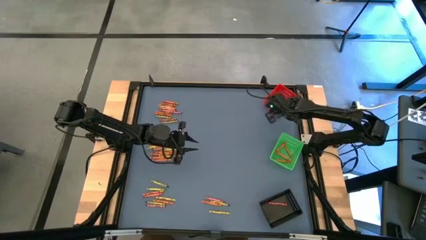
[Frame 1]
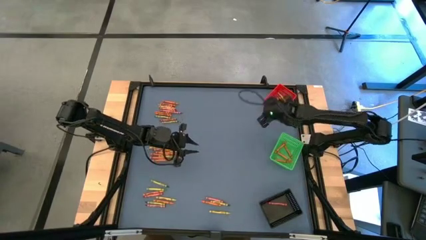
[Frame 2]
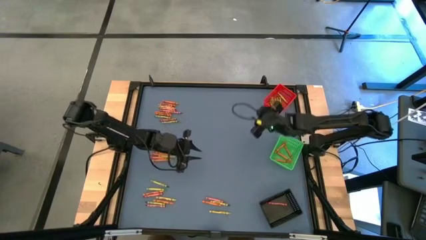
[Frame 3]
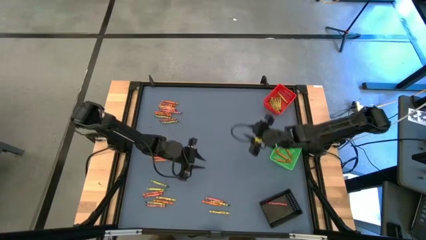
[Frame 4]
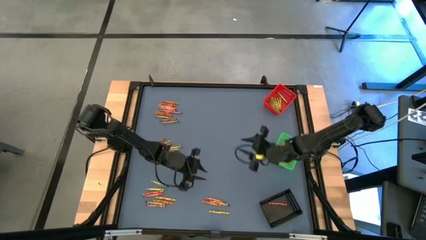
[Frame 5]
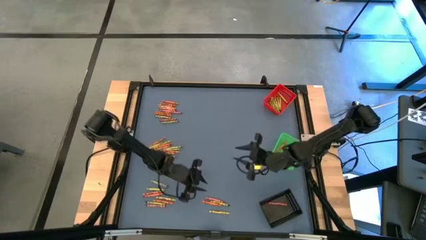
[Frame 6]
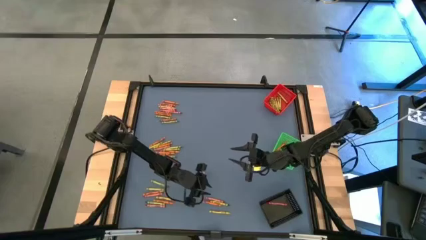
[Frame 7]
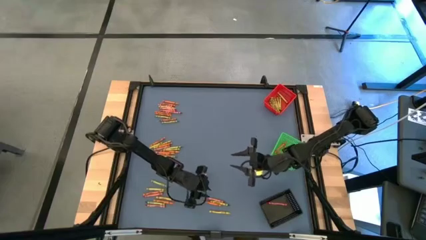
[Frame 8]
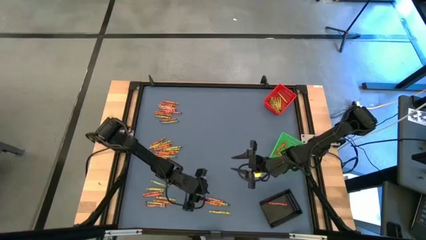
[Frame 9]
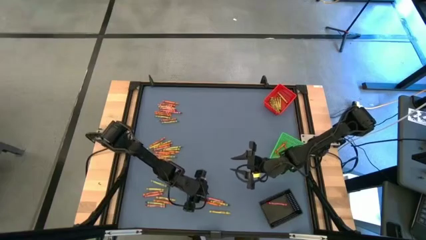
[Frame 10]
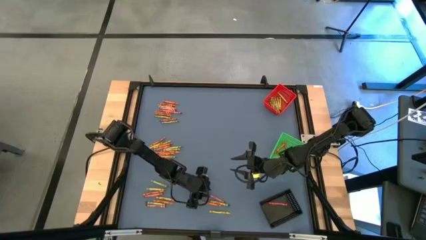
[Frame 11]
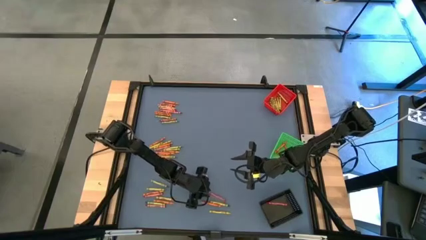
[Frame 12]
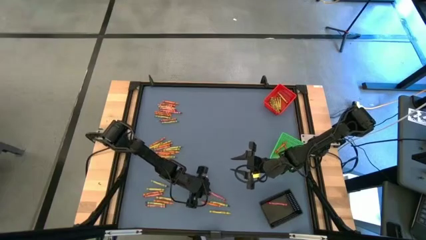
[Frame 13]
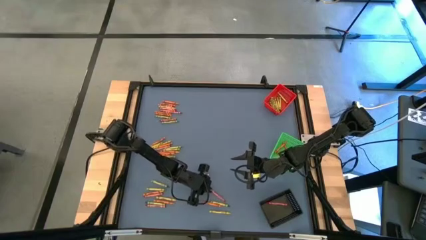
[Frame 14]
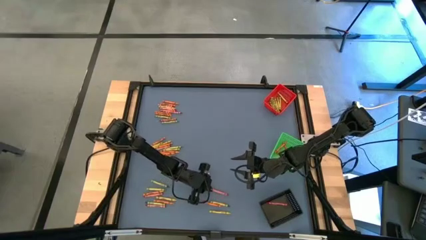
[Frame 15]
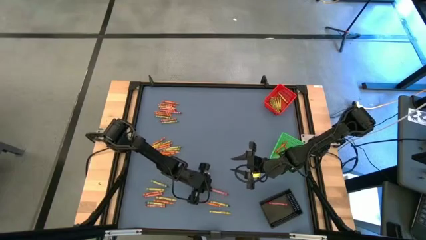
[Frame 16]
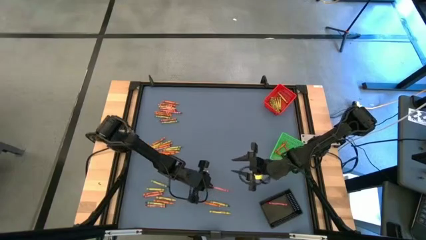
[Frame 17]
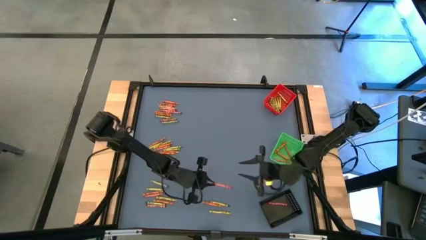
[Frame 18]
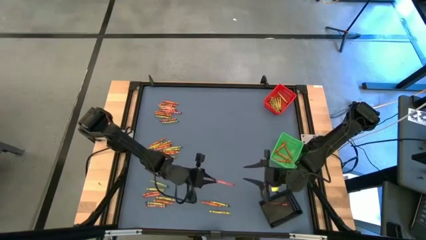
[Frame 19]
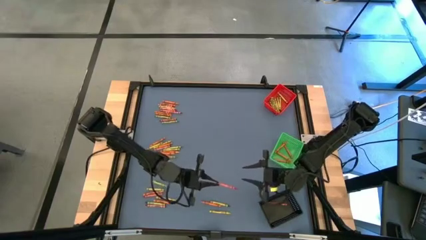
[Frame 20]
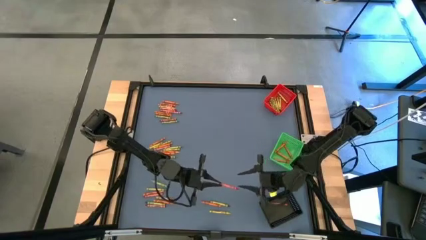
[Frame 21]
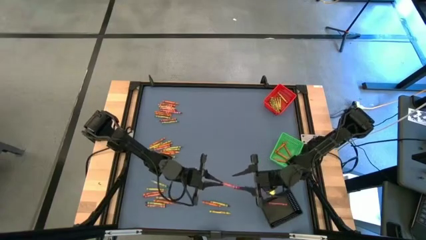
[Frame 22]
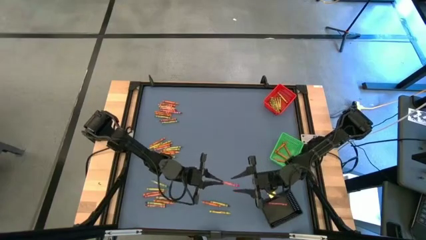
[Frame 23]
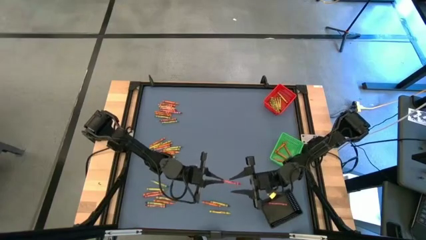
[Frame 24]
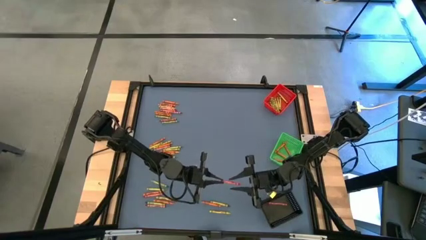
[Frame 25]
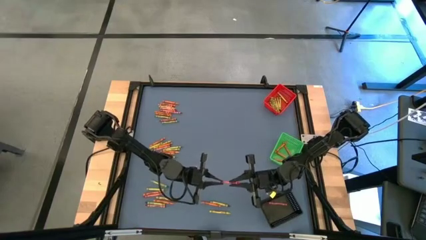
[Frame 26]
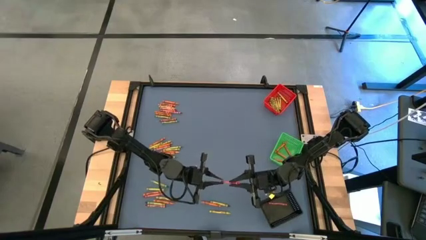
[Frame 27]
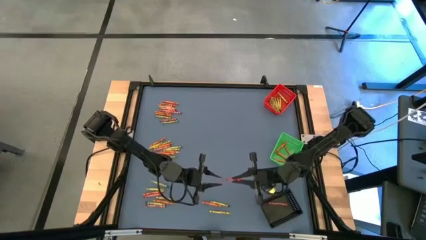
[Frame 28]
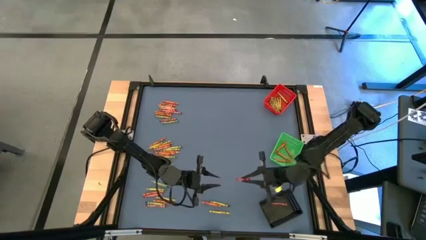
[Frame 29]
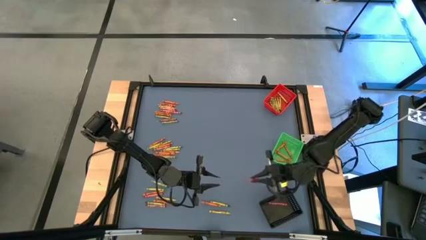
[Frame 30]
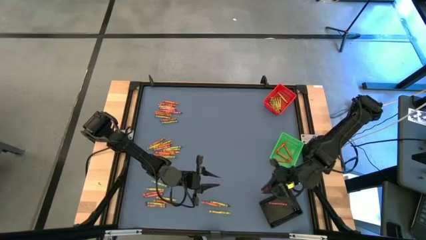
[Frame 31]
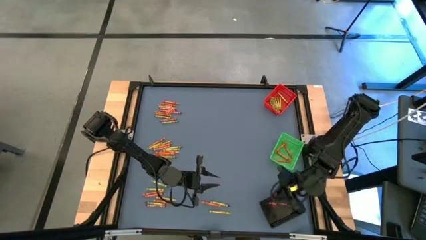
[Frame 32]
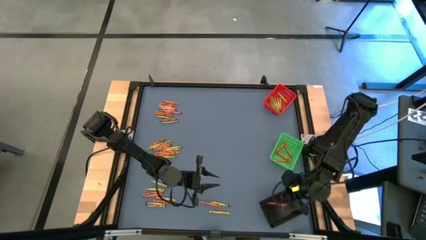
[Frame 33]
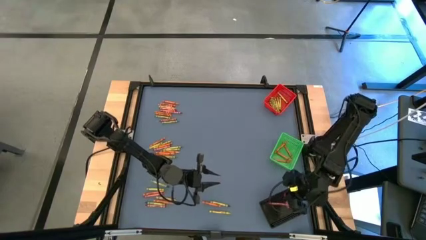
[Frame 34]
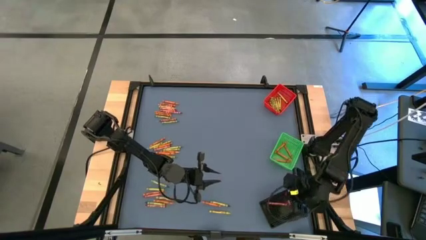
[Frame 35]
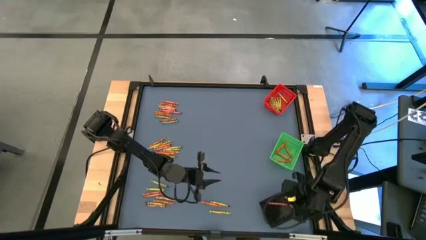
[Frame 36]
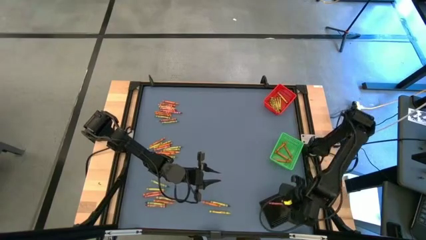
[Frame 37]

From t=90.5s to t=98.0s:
Task: Sort crayons
Put the red crayon into the black bin

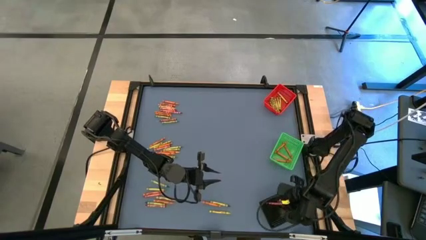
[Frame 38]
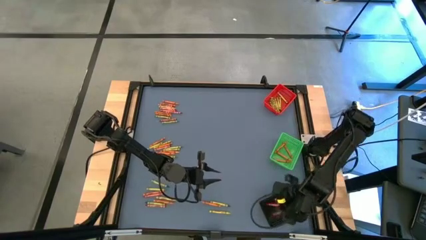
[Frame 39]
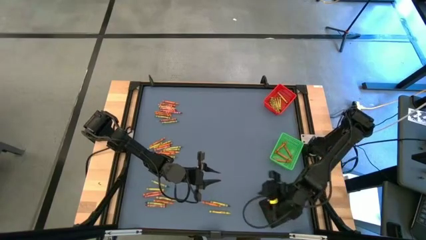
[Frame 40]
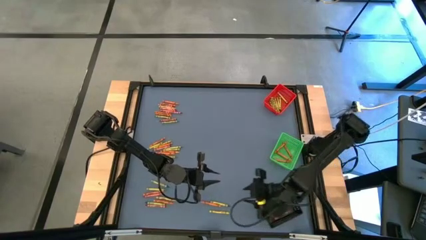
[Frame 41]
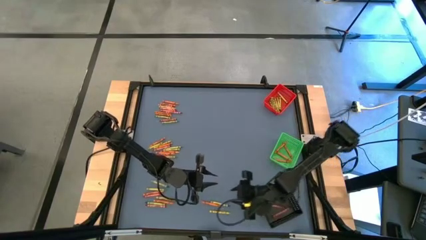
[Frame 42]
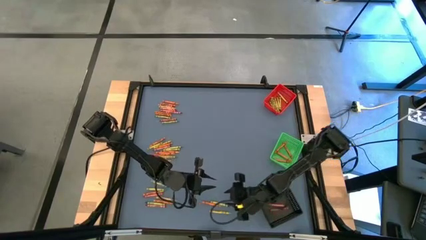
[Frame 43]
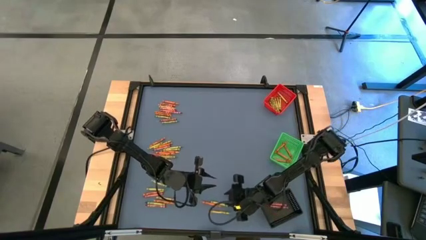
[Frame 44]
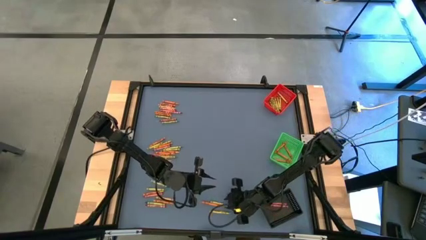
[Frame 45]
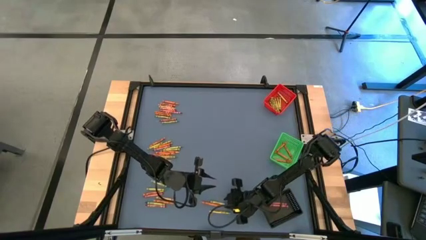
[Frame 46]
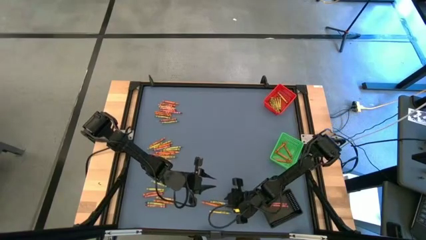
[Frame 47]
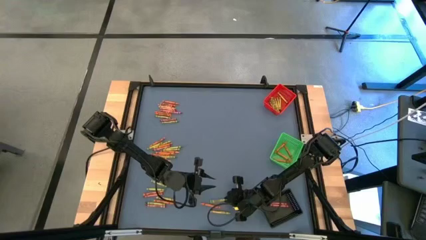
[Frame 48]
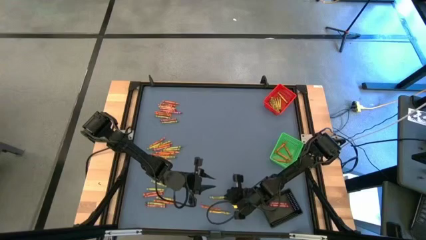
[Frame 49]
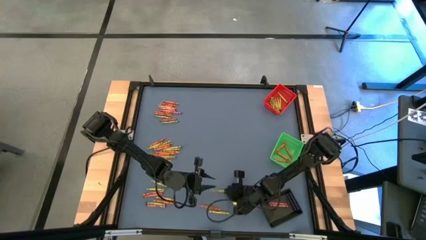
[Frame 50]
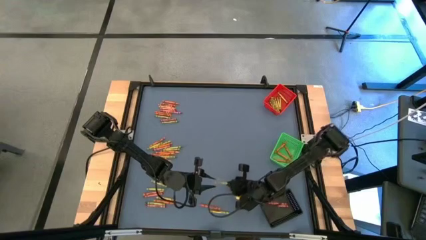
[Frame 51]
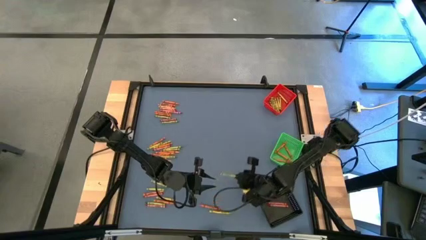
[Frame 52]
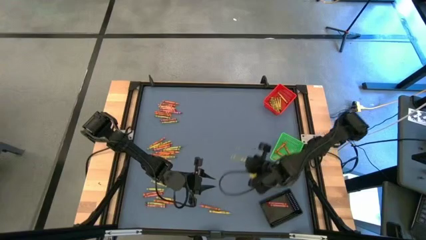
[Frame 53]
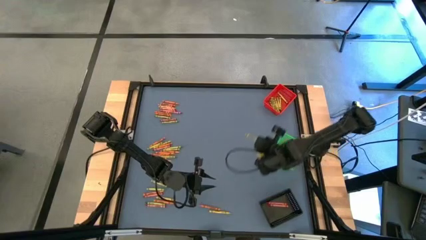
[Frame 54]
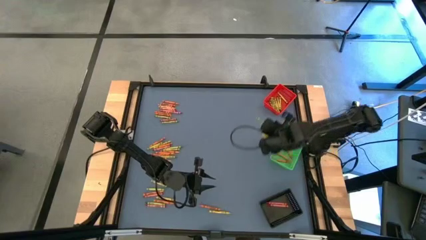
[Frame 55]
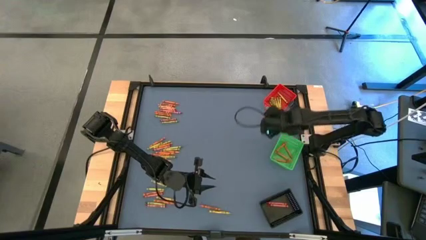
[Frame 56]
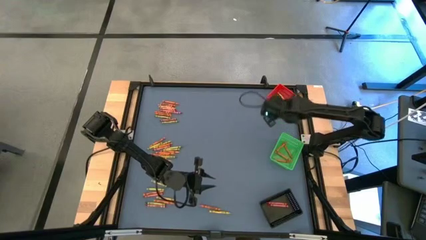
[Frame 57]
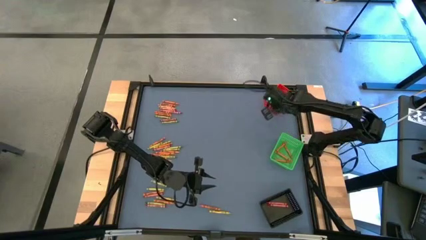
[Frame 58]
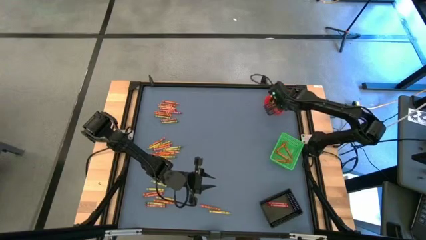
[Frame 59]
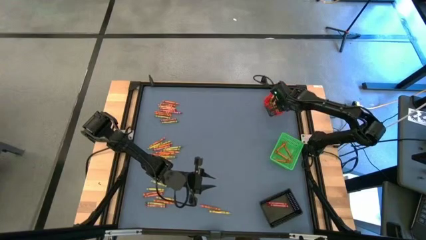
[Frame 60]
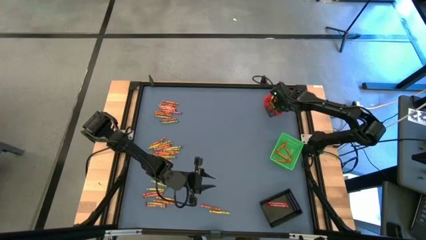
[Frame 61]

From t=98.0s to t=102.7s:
Put the green crayon into the red bin

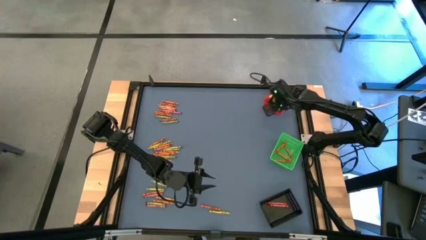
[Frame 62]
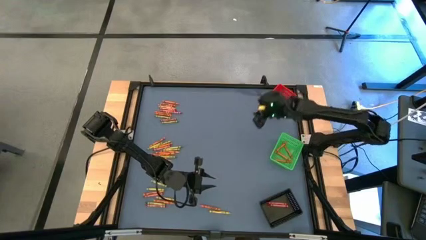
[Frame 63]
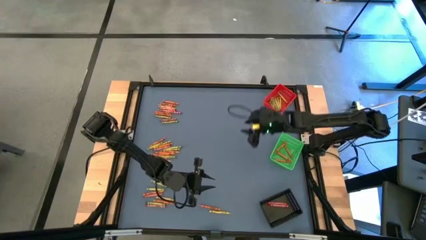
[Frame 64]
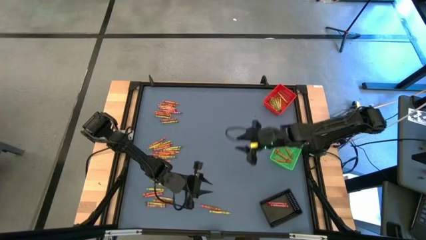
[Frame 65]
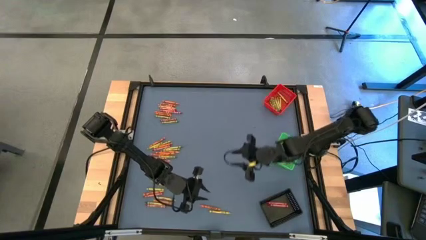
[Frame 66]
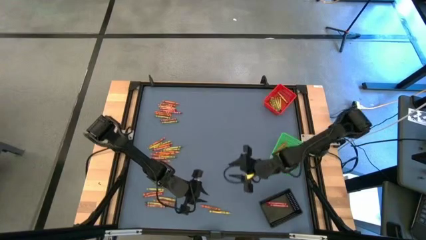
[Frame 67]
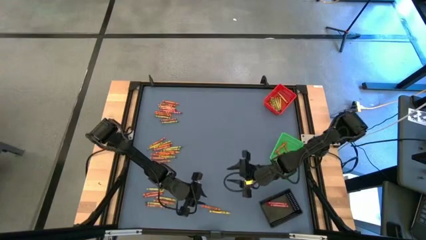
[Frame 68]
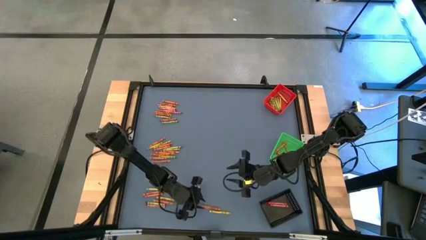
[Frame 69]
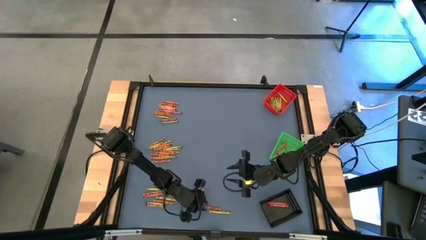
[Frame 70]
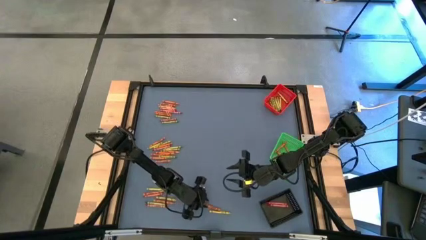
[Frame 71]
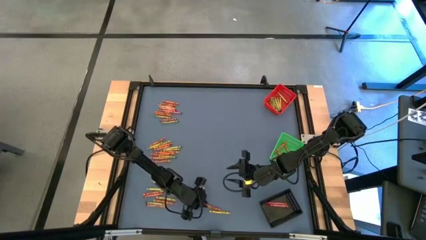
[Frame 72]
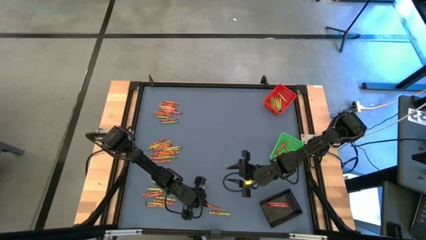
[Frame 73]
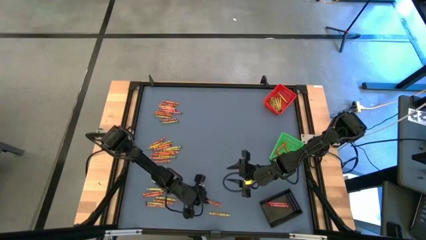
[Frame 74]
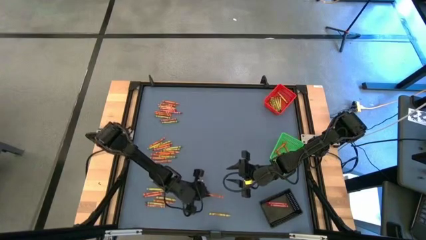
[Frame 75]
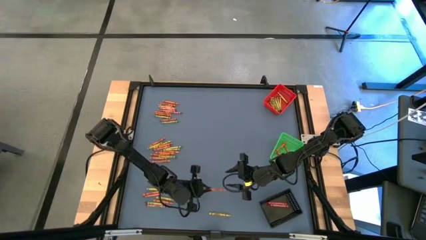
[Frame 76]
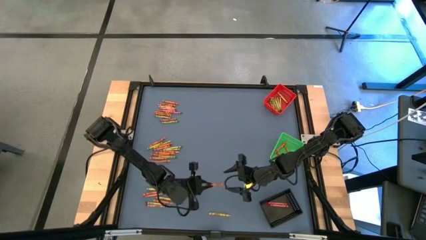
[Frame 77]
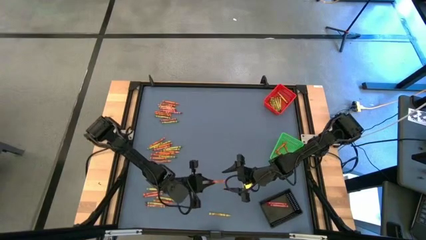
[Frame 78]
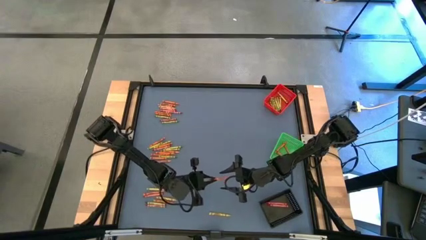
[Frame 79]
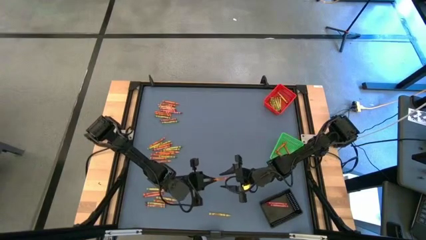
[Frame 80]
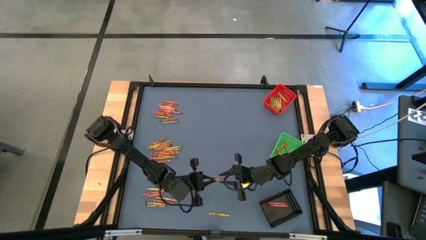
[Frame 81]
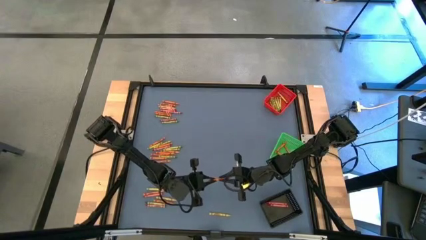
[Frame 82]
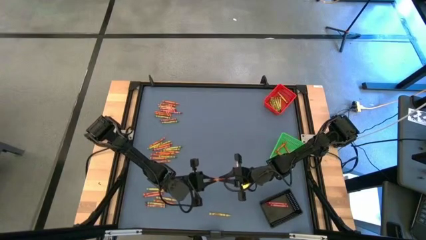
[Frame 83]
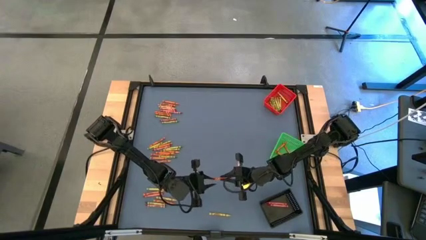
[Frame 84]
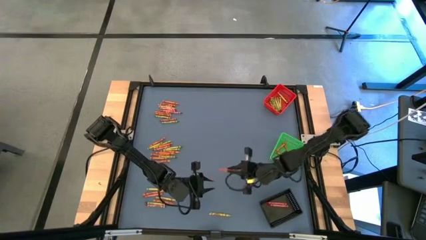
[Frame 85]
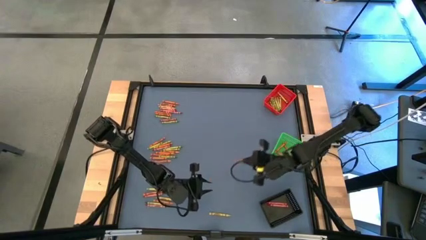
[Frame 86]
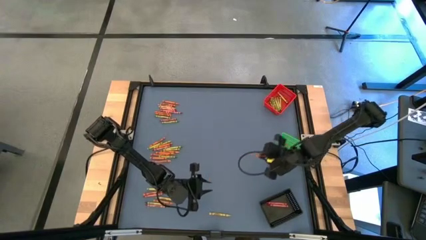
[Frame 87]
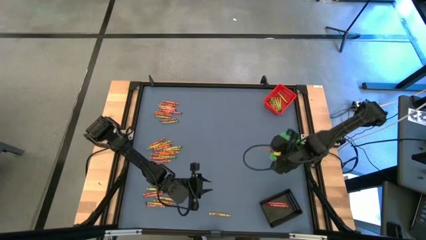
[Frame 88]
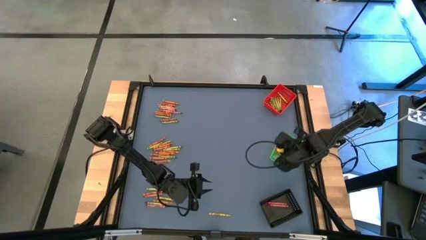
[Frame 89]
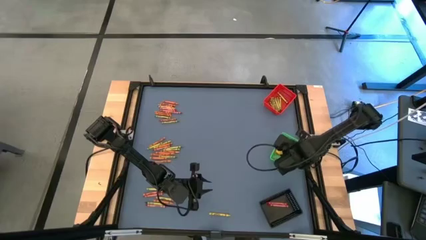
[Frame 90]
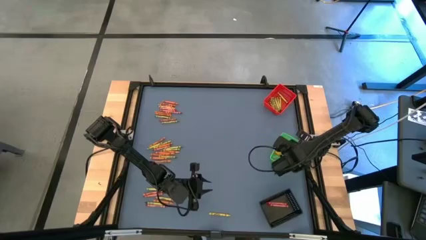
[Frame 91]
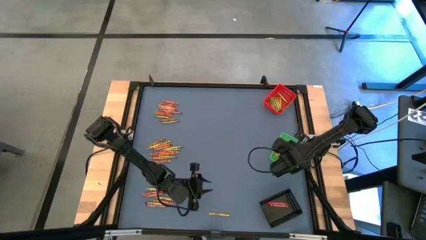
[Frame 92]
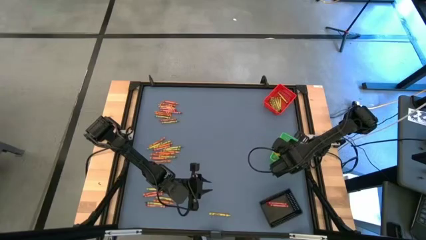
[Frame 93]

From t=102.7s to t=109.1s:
Put the orange crayon into the green bin
